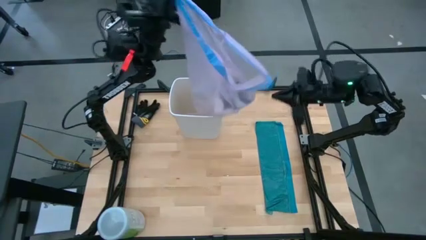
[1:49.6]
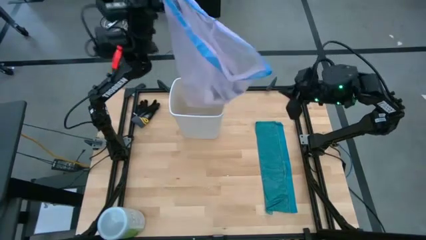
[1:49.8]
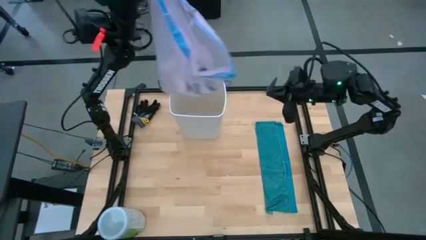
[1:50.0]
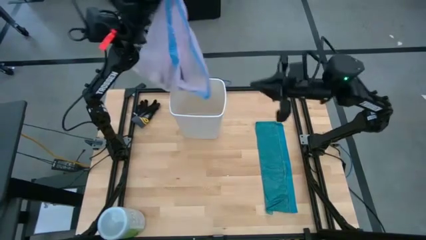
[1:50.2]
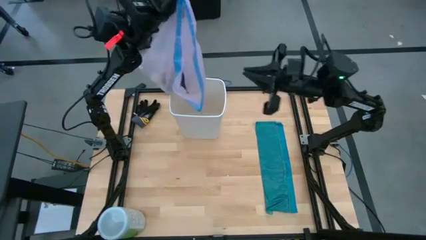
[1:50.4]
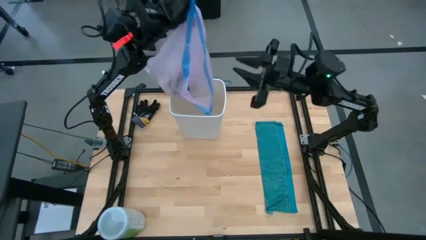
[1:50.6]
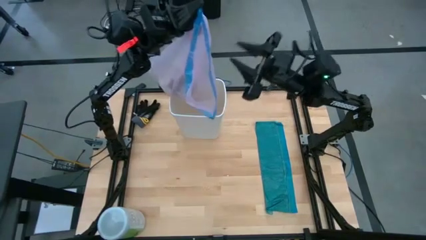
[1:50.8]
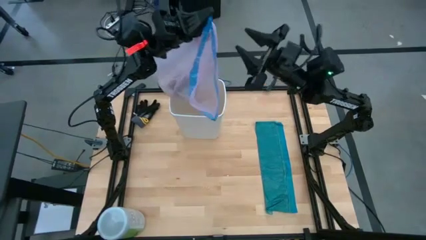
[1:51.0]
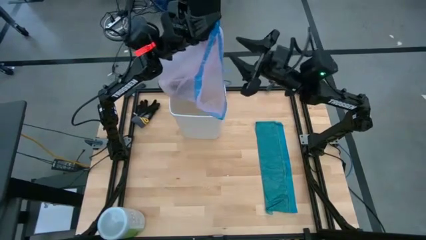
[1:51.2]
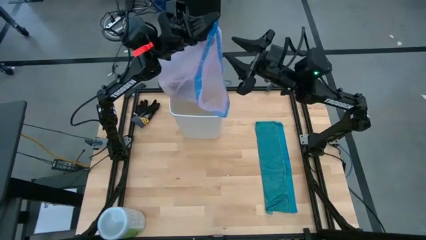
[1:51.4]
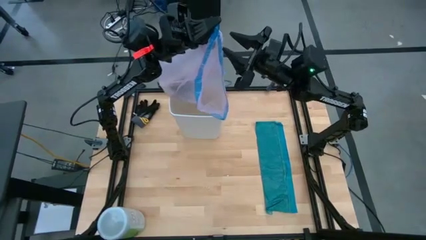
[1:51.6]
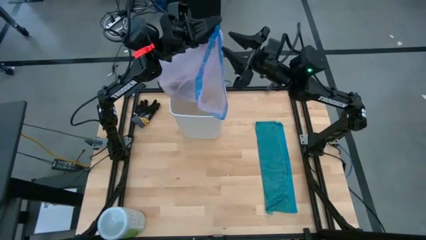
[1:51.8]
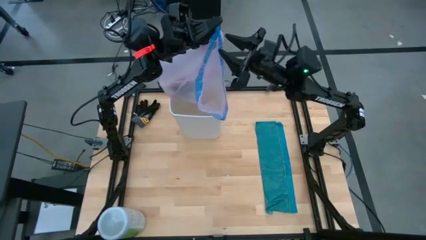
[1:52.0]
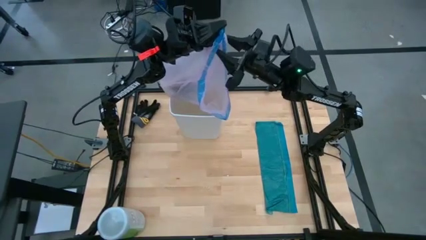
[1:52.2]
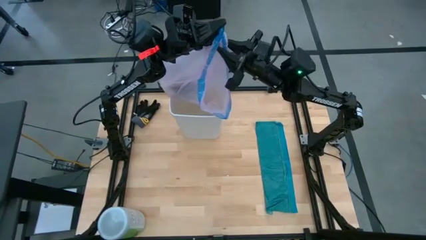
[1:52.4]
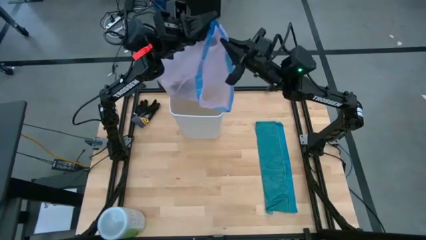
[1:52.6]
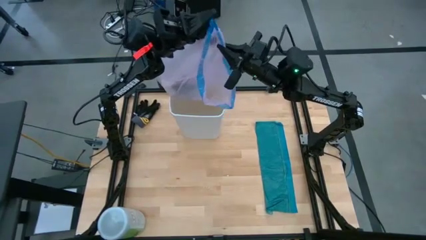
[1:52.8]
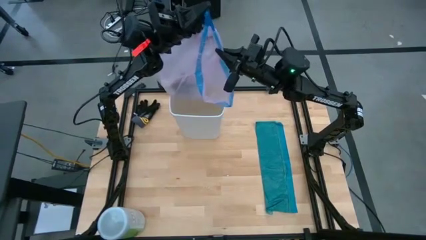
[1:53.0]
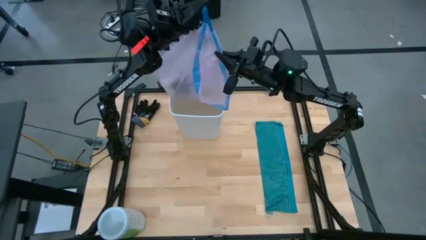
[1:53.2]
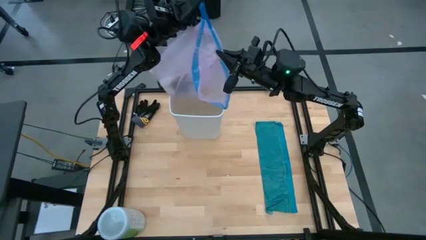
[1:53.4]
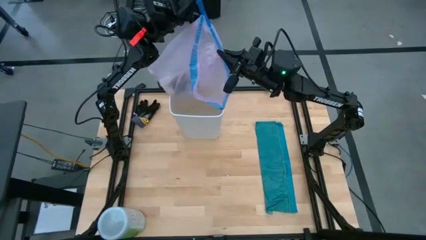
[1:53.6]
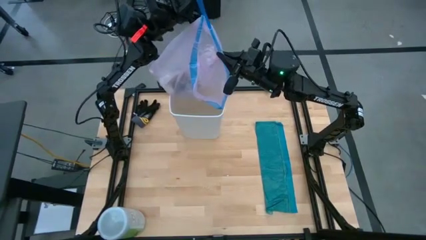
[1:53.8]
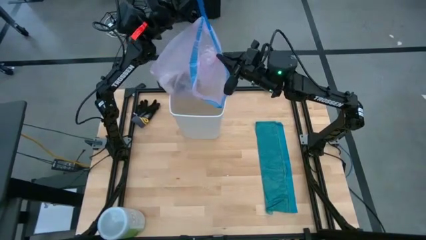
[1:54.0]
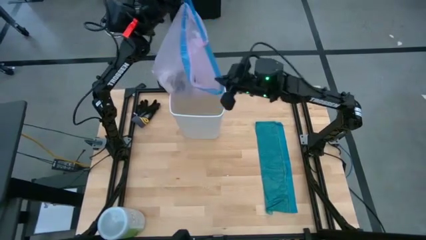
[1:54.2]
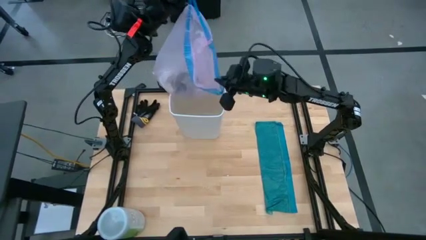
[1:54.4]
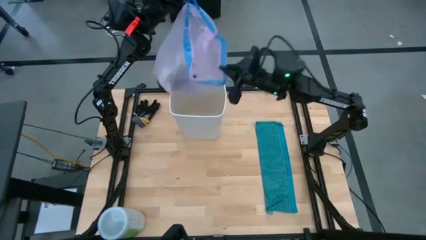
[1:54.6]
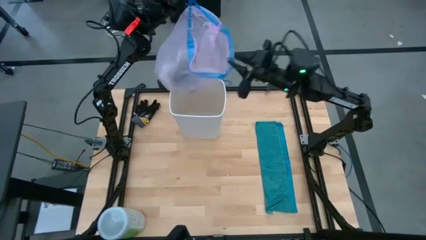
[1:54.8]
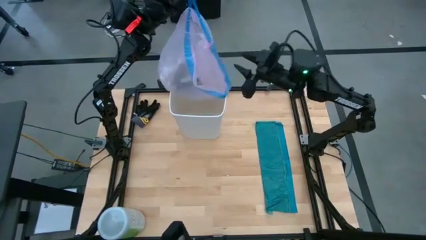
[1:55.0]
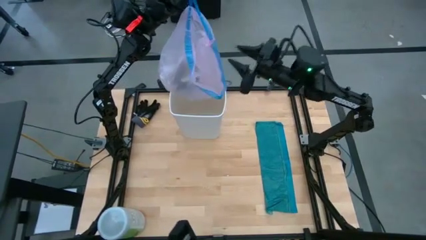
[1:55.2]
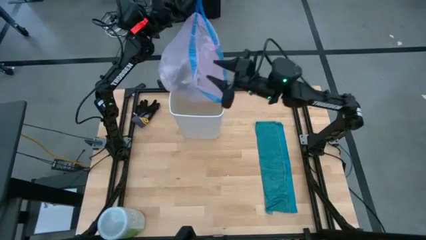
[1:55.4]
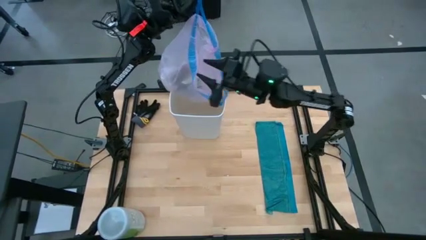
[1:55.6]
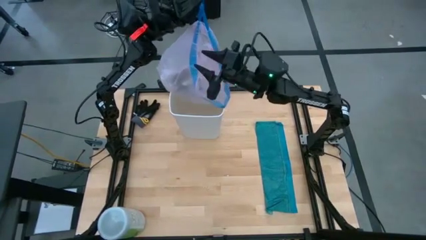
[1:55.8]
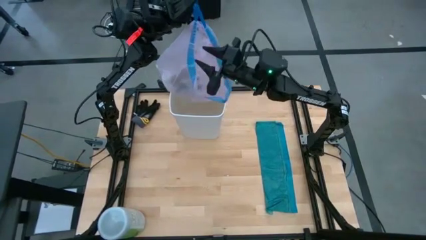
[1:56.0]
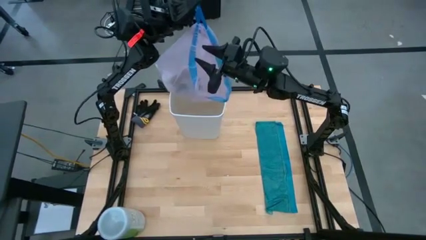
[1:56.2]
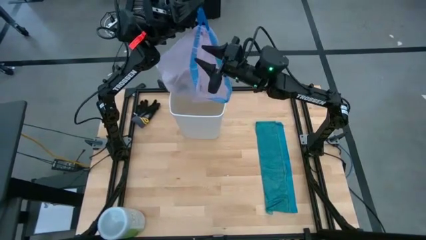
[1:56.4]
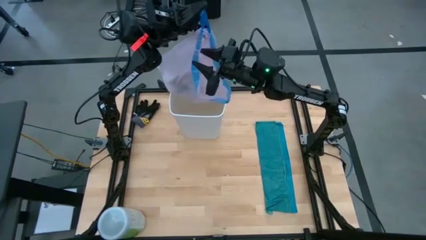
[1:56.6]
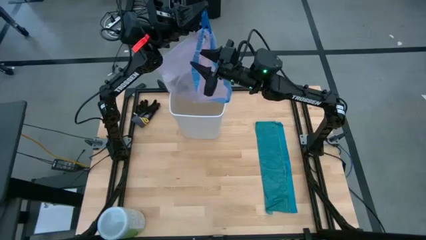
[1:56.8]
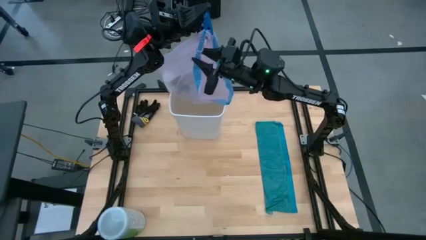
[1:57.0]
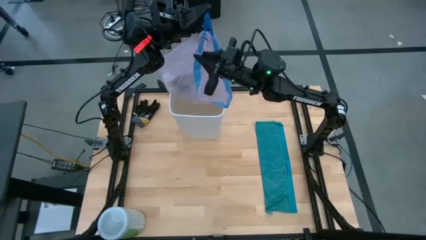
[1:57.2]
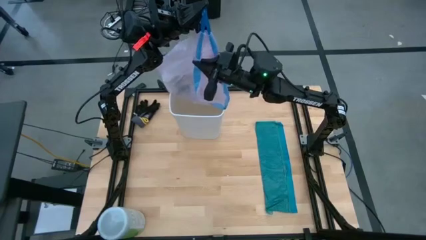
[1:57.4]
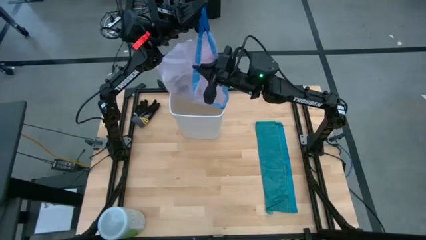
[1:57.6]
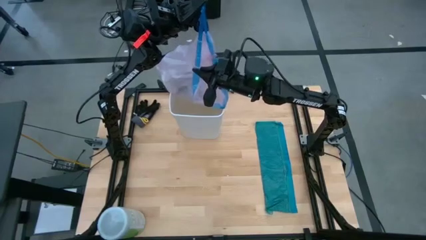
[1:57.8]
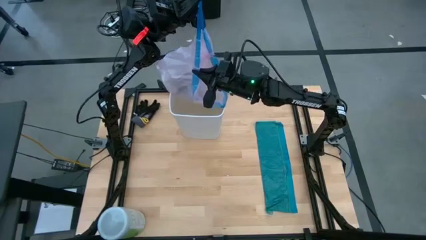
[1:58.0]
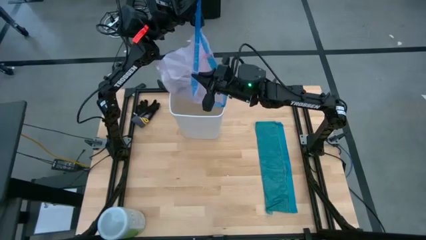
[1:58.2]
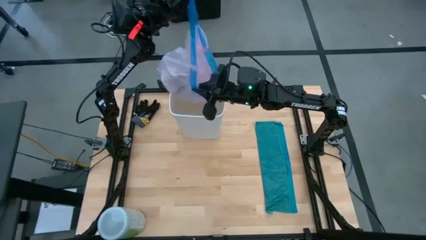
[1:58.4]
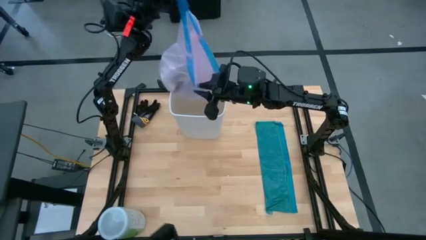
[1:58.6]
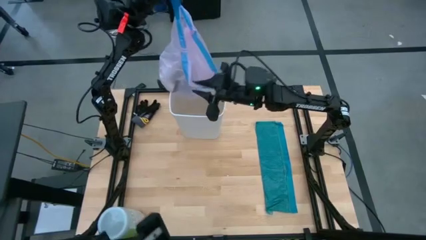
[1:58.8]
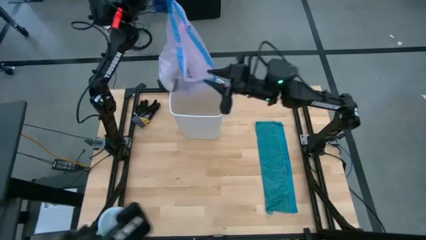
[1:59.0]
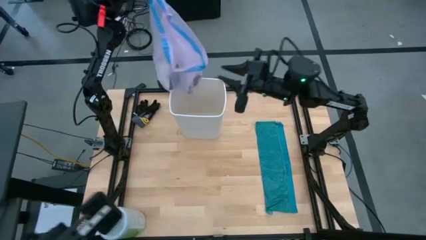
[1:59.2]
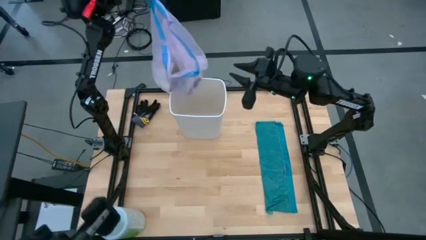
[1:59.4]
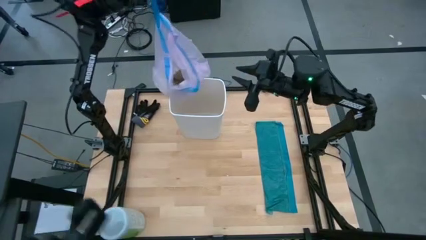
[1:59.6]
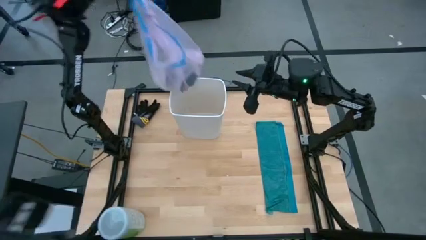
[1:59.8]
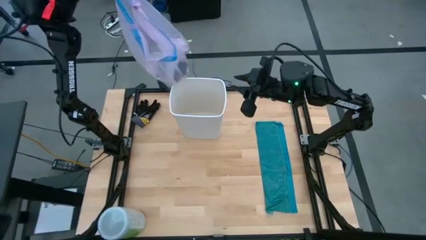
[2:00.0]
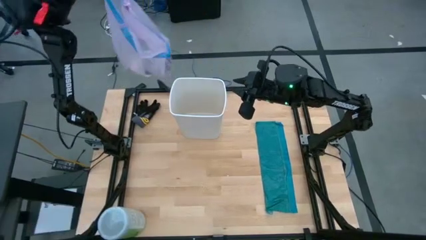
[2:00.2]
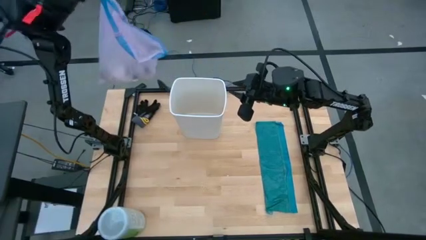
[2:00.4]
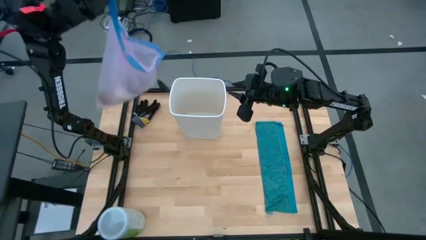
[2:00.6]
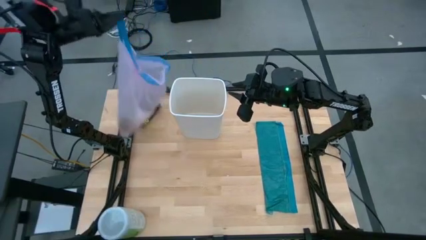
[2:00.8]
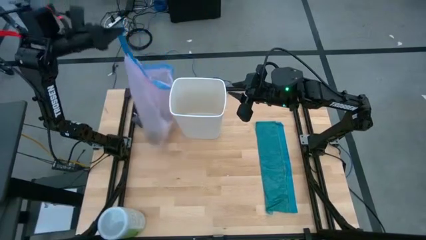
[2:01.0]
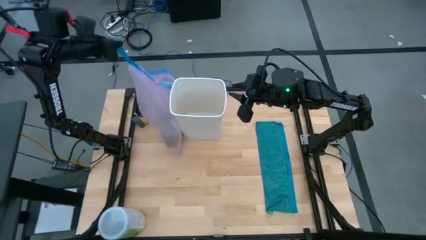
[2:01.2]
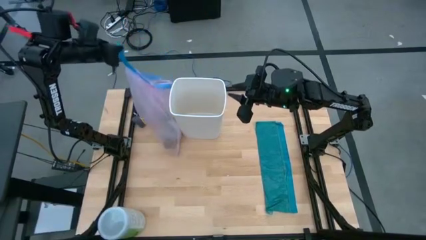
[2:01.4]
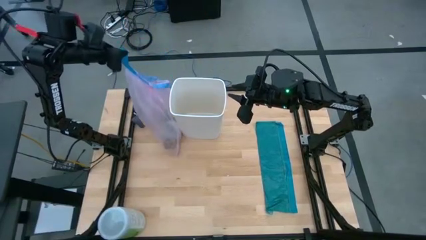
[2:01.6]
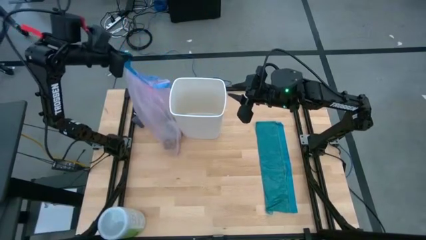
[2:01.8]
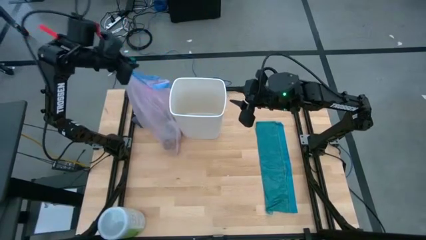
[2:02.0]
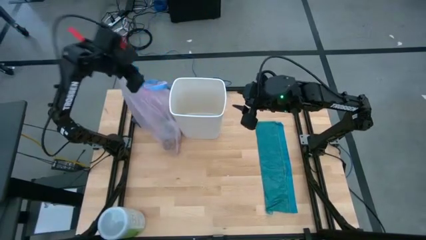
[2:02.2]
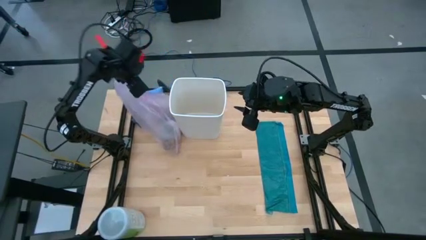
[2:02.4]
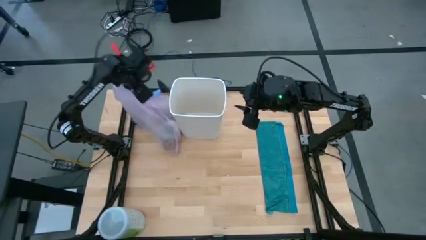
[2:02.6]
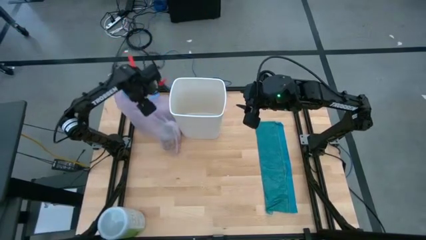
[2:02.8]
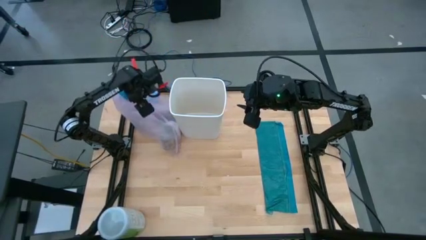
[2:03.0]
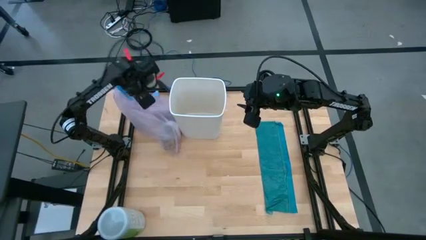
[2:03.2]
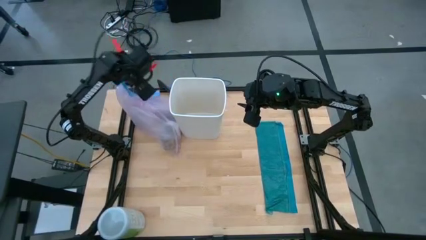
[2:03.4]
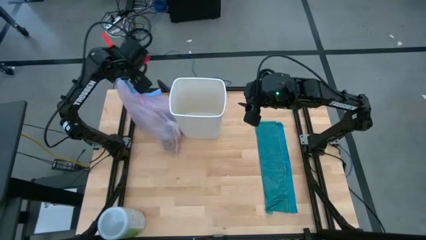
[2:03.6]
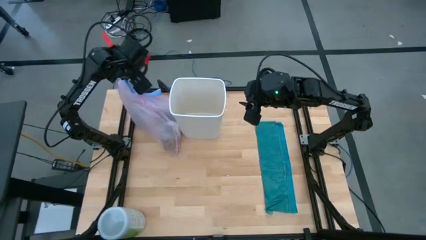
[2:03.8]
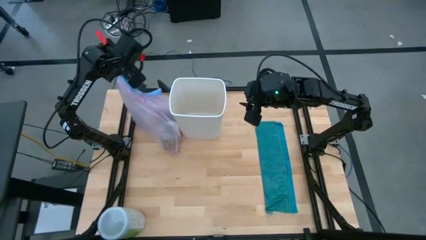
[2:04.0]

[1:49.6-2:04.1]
Task: place trash/remove bag and relplace
Remove the trash bag from the white trash bin
